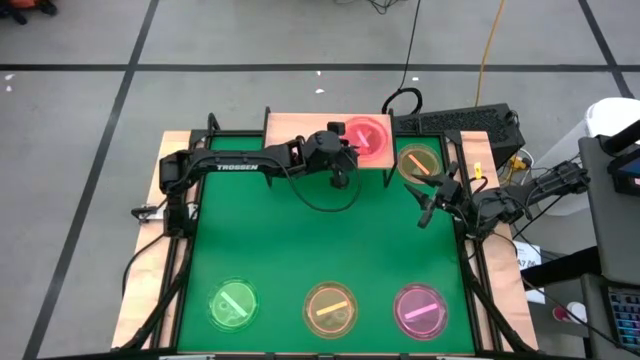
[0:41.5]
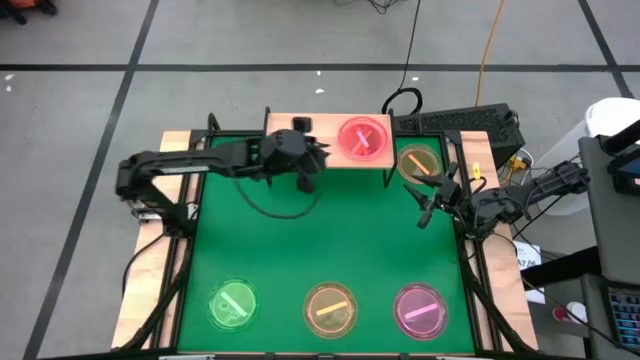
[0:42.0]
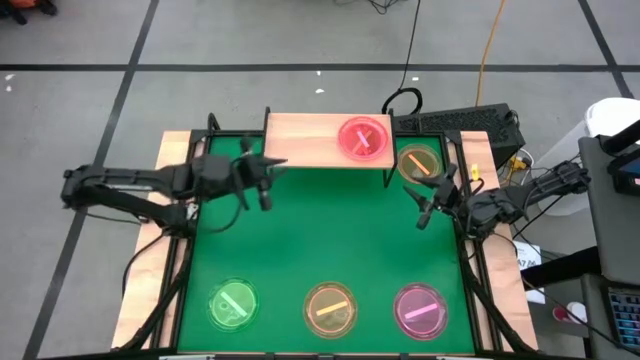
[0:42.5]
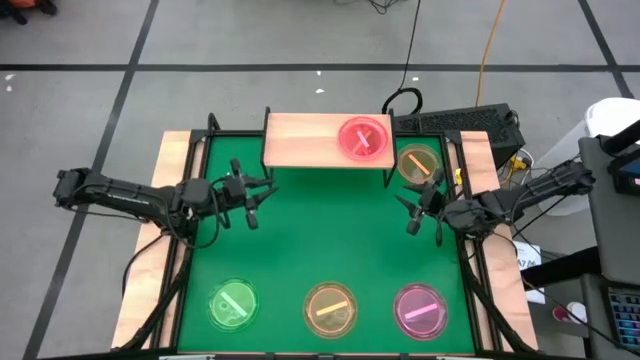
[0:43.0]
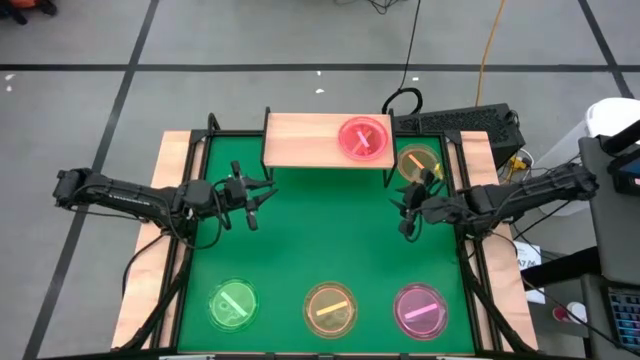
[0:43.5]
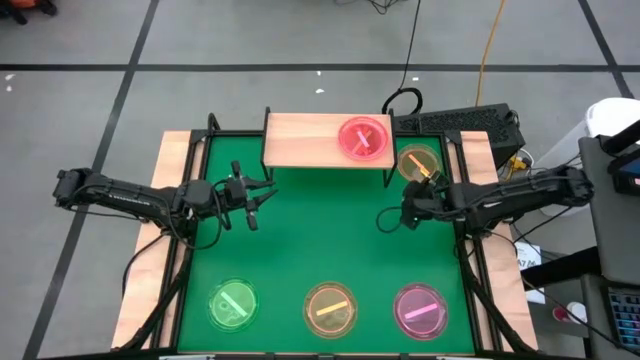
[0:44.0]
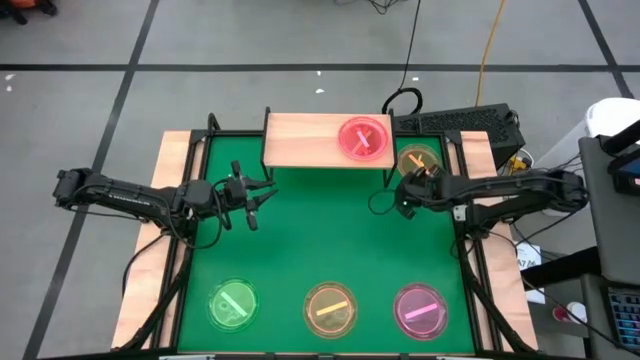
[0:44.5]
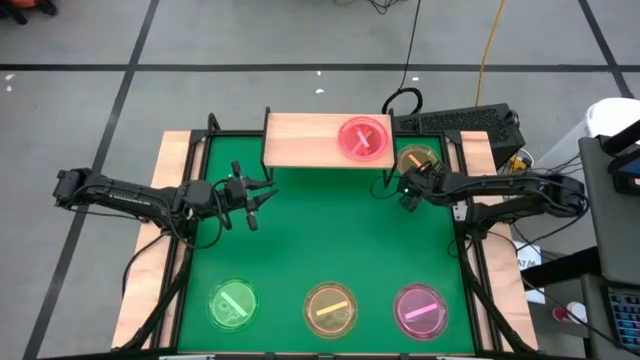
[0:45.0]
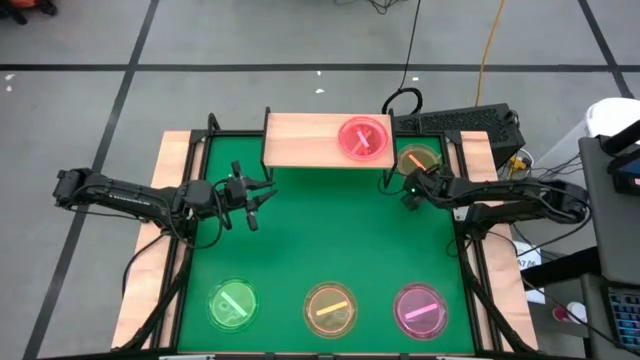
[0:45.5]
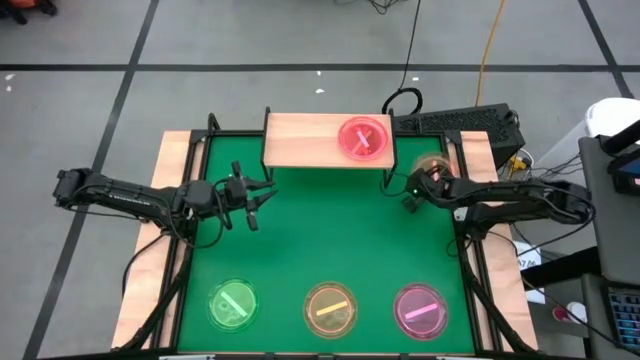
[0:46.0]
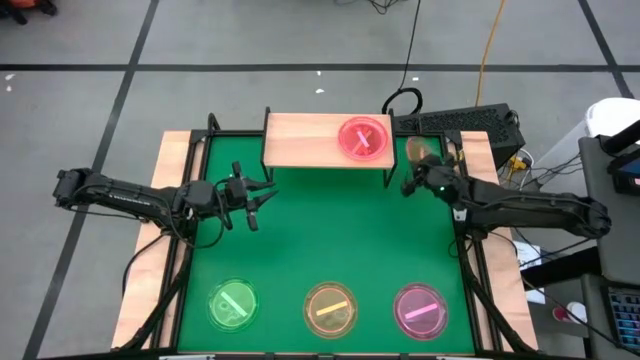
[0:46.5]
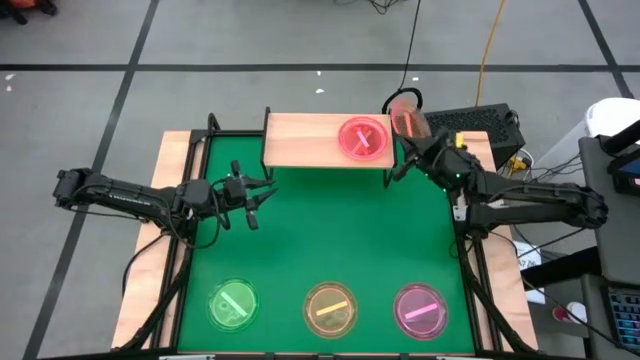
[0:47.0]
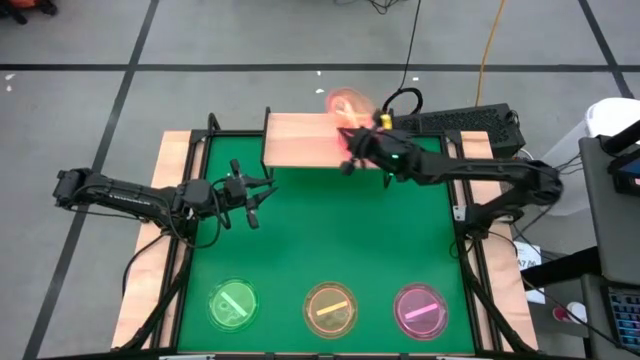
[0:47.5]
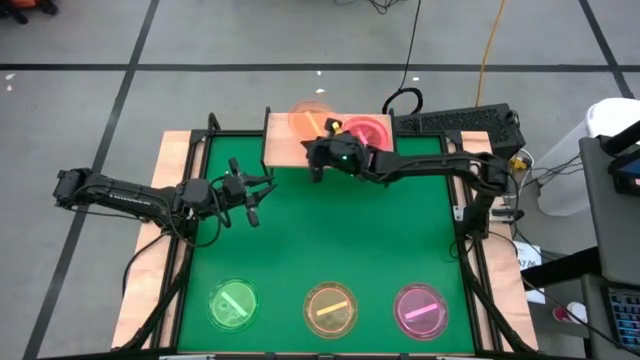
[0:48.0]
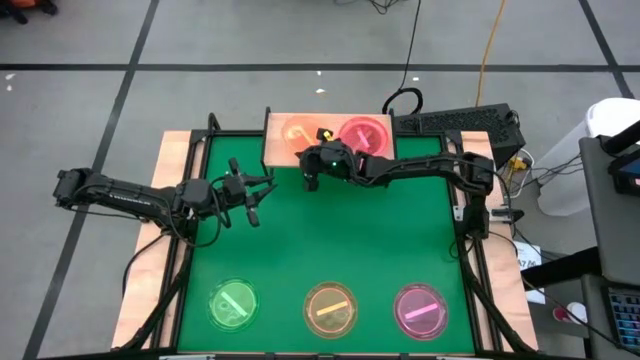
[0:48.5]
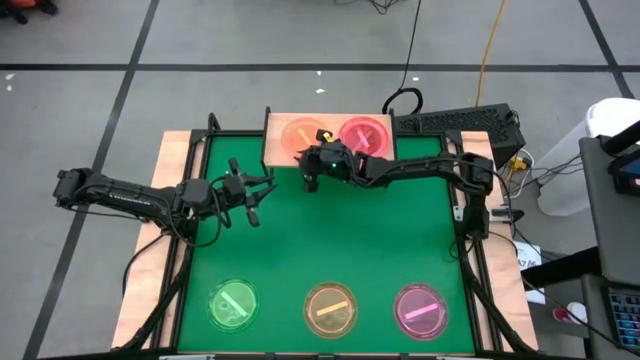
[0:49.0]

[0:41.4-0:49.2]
Task: Place and stack plates onto a shelf
Put the top orange plate on the shelf

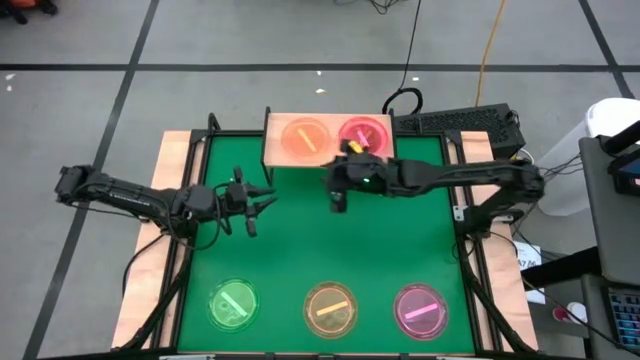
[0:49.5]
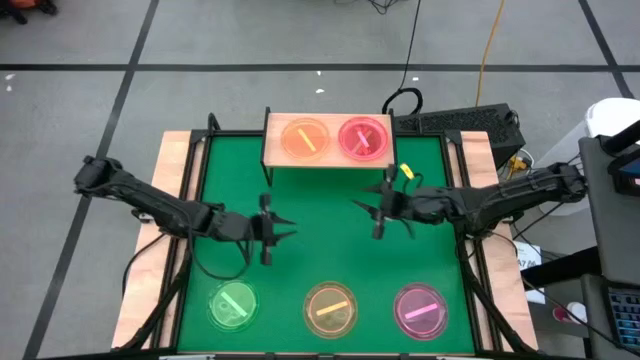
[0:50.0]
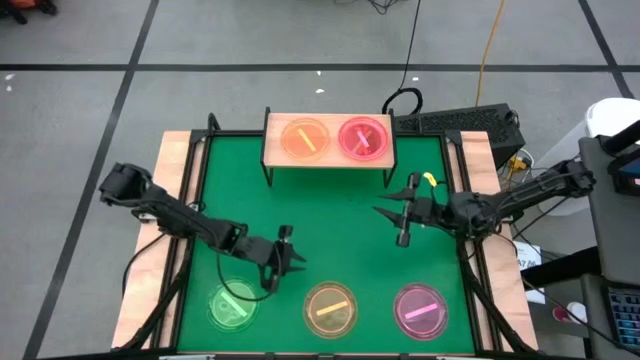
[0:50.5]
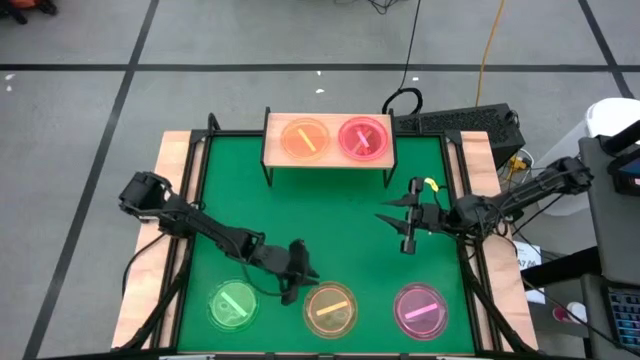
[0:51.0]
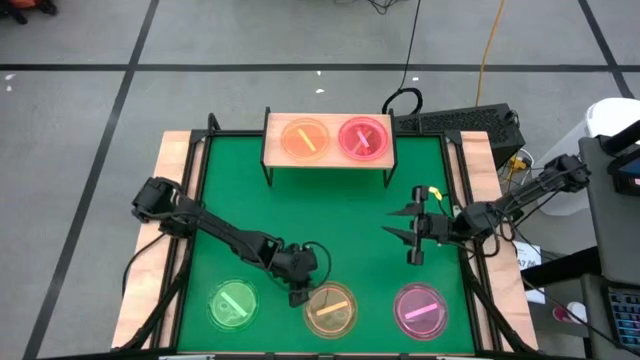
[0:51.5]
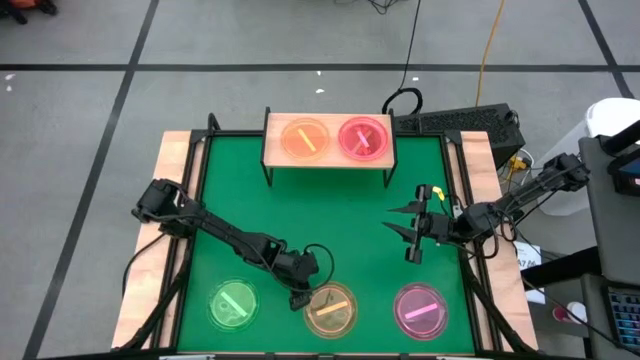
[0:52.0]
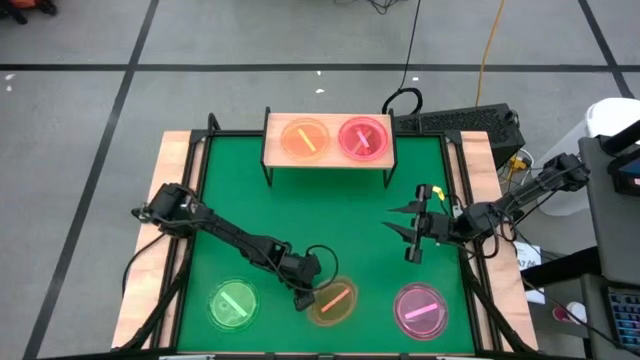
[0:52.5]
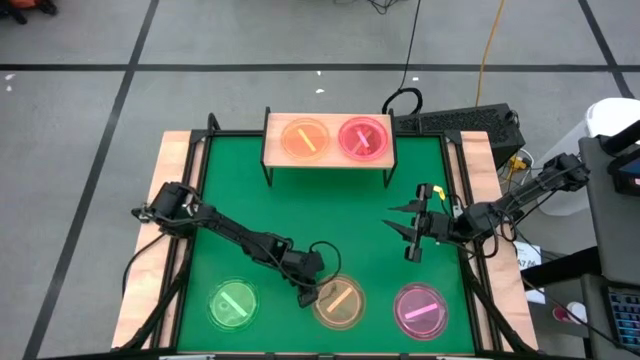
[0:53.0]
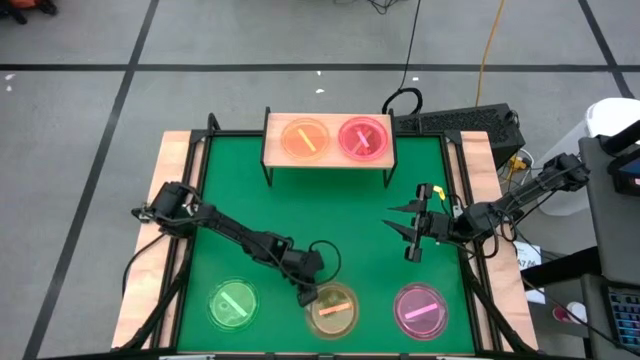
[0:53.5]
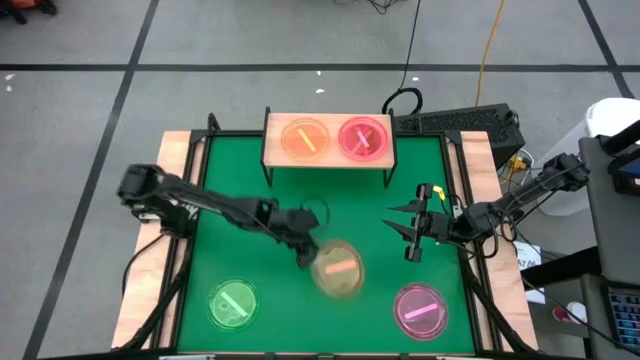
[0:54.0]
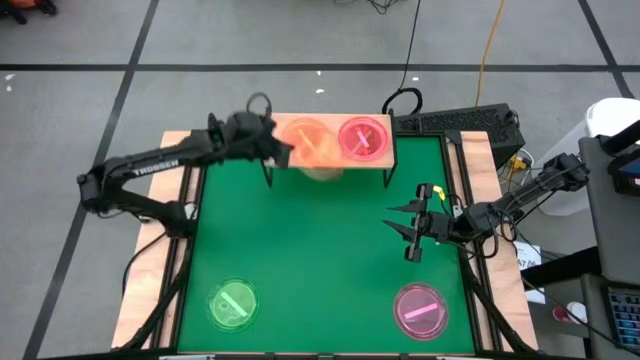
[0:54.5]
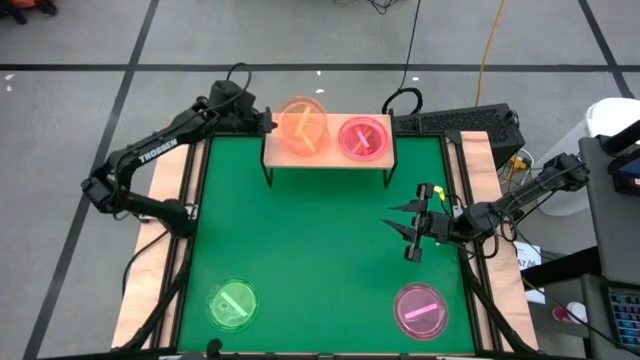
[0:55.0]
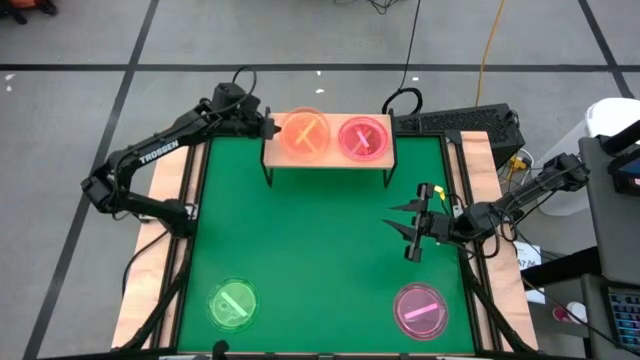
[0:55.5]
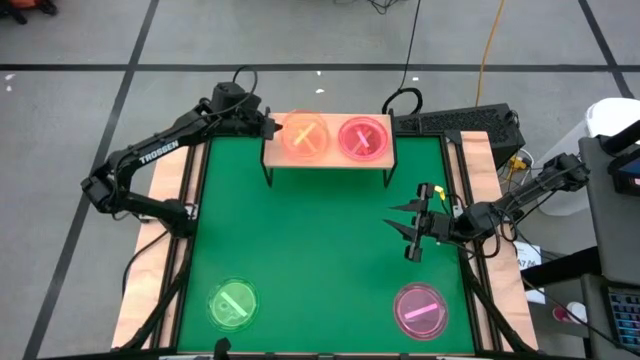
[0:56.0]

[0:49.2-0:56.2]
Stack the orange plate on top of the orange plate on the shelf

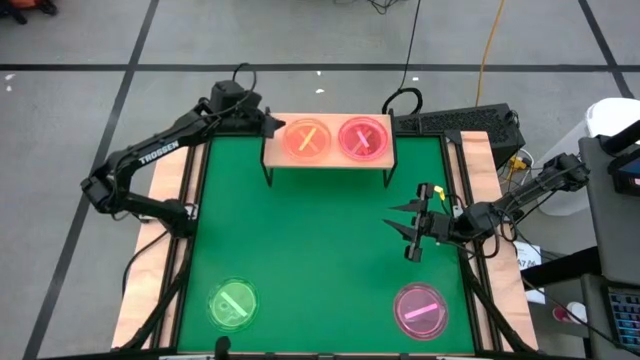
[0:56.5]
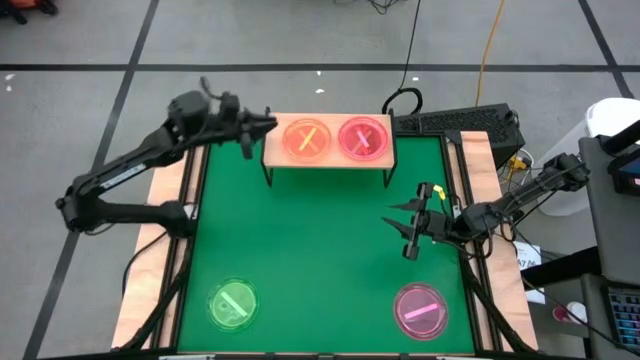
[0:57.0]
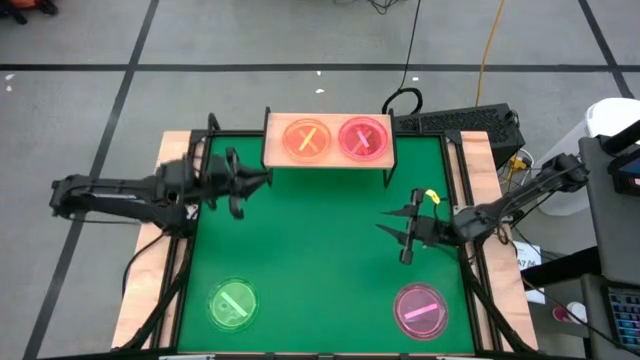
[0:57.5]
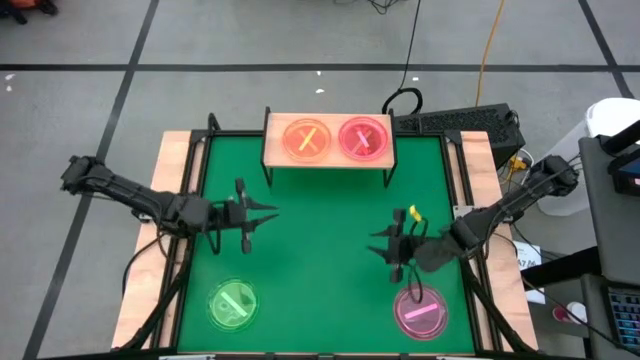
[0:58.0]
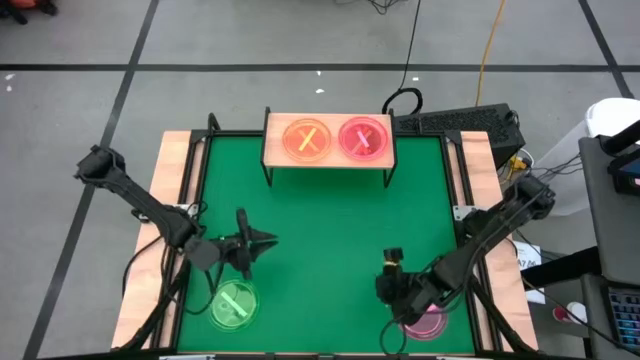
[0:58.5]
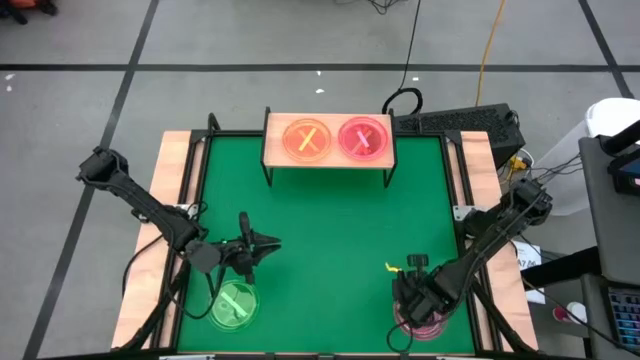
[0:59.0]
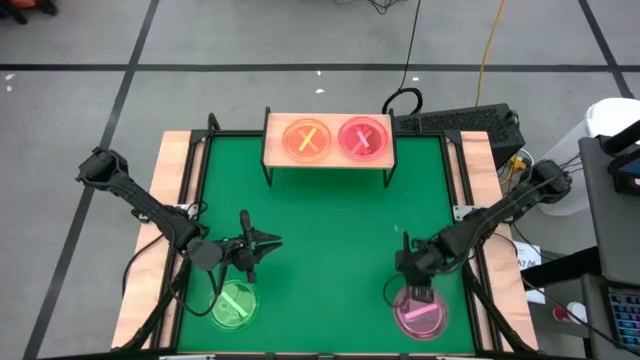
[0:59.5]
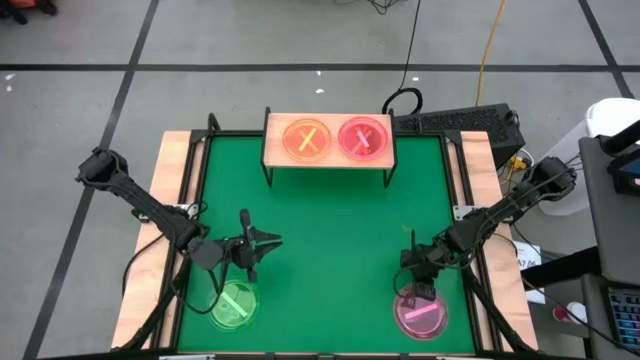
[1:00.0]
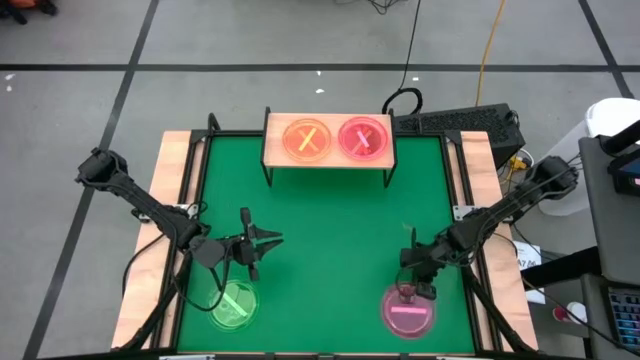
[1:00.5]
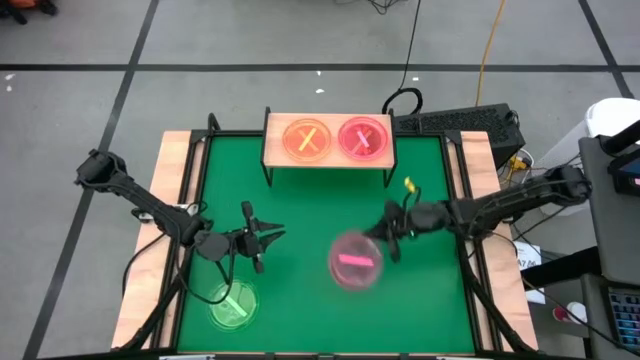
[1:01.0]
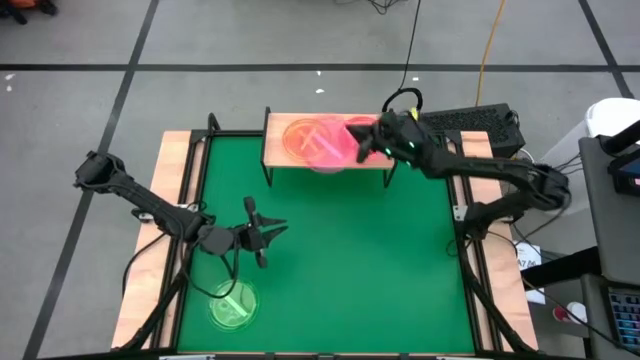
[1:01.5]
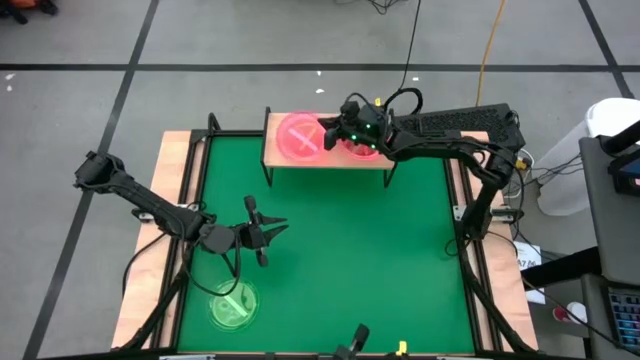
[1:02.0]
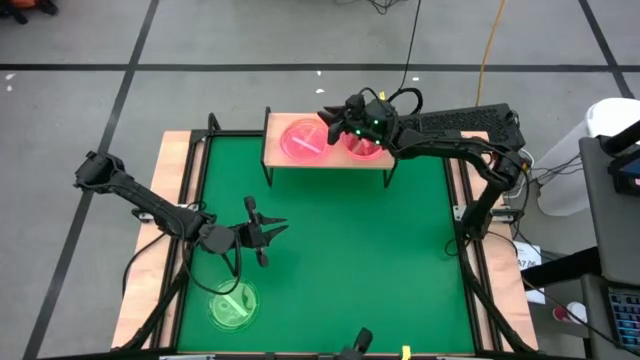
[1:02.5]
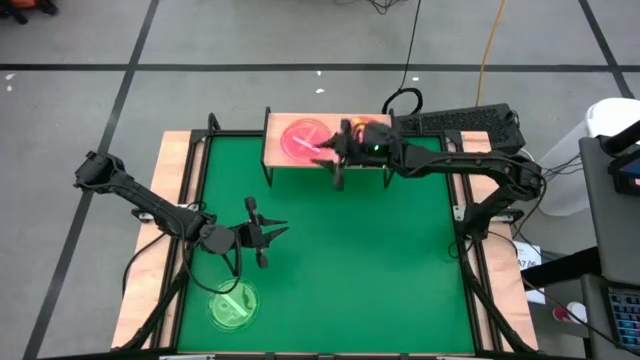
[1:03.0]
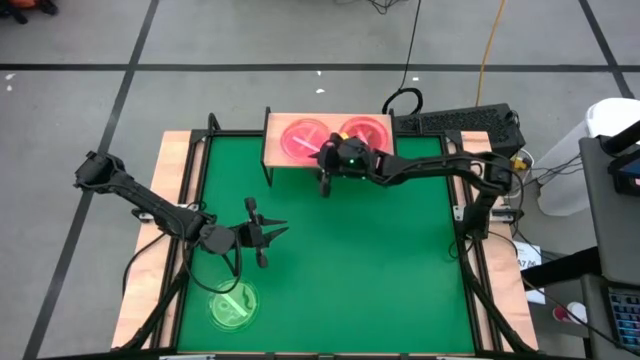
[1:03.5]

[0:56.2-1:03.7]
Stack the pink plate on top of the orange plate on the shelf

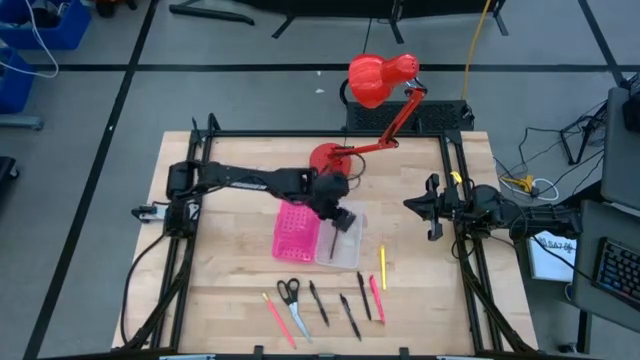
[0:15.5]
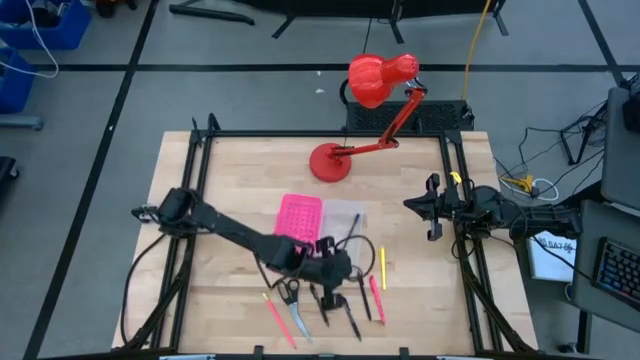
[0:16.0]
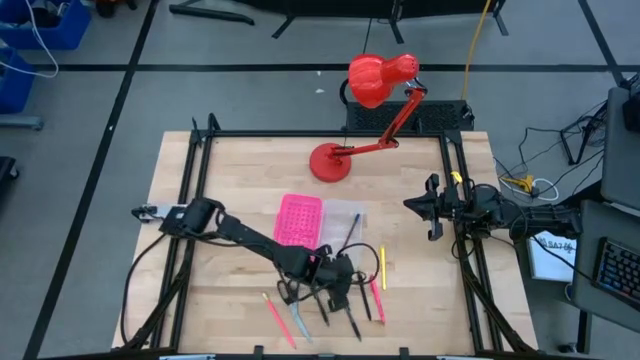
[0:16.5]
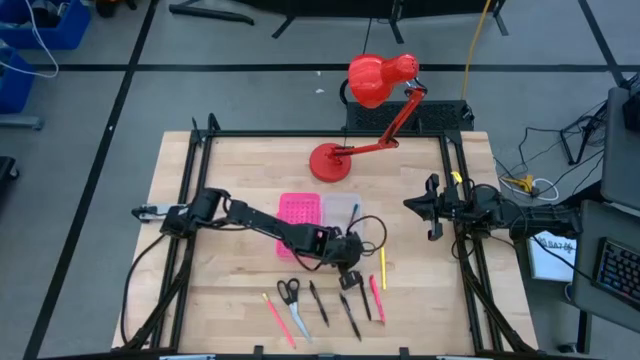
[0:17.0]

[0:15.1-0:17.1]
Task: Pick & place school supplies into a supply box
Adjust the pink supply box
